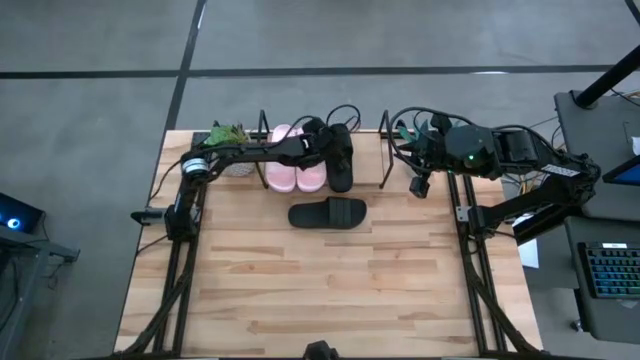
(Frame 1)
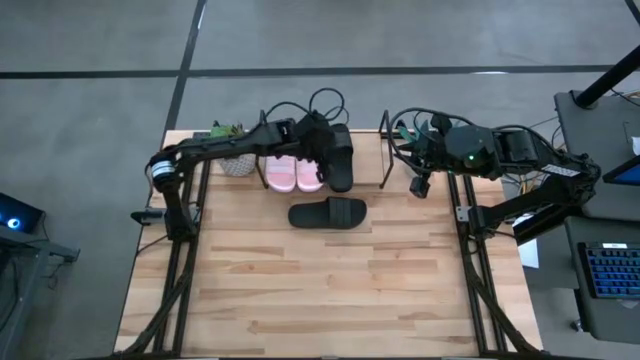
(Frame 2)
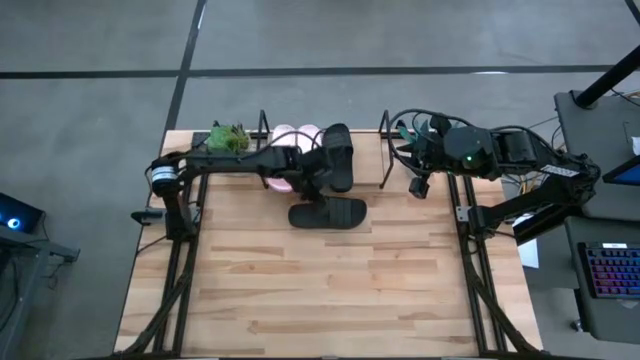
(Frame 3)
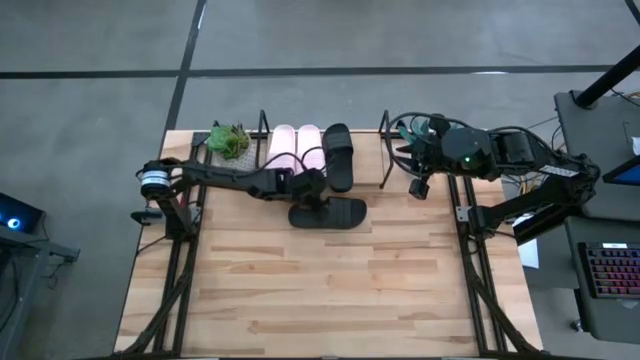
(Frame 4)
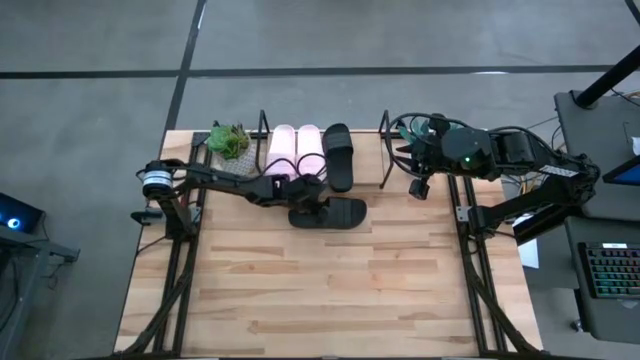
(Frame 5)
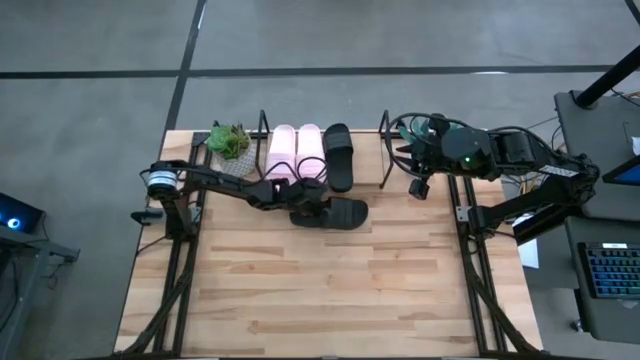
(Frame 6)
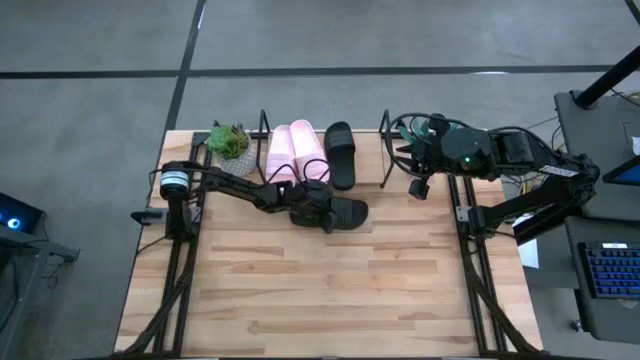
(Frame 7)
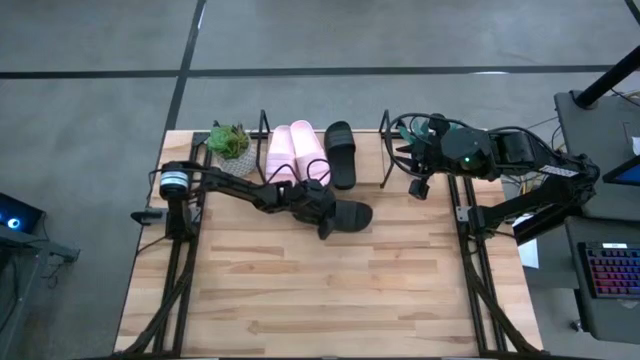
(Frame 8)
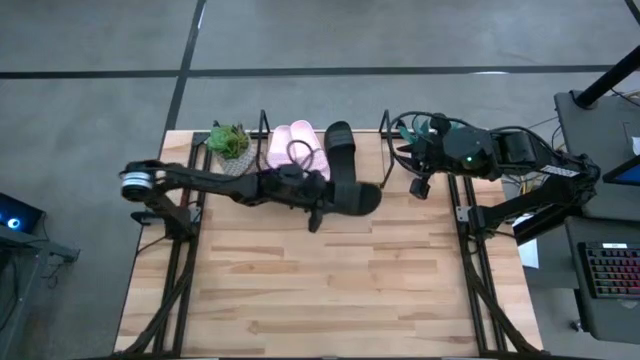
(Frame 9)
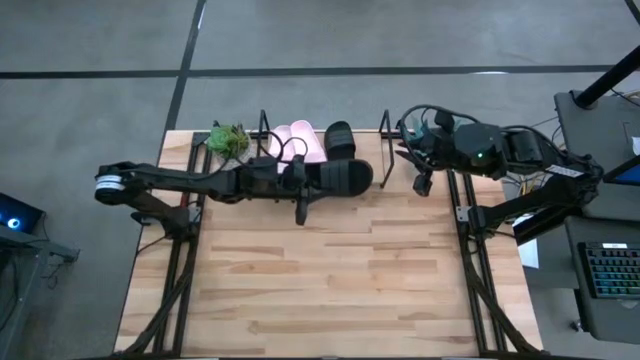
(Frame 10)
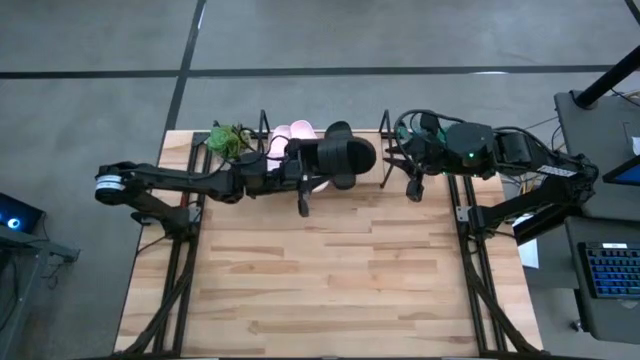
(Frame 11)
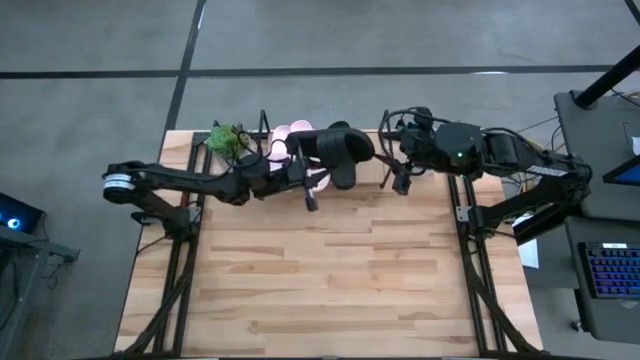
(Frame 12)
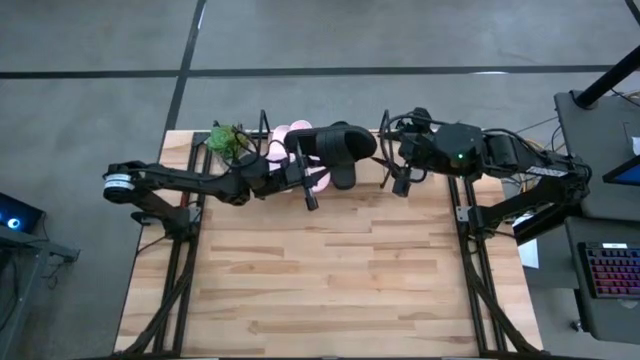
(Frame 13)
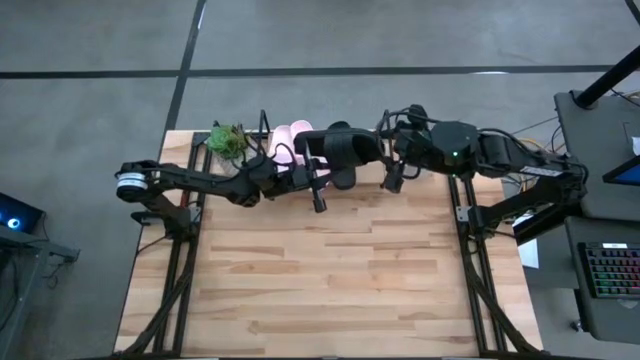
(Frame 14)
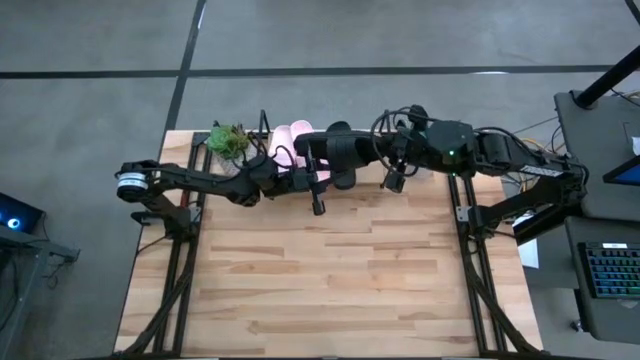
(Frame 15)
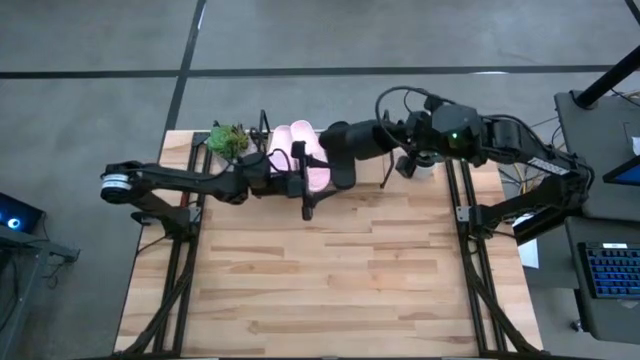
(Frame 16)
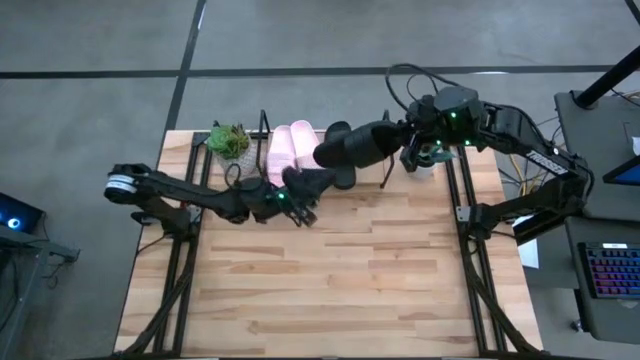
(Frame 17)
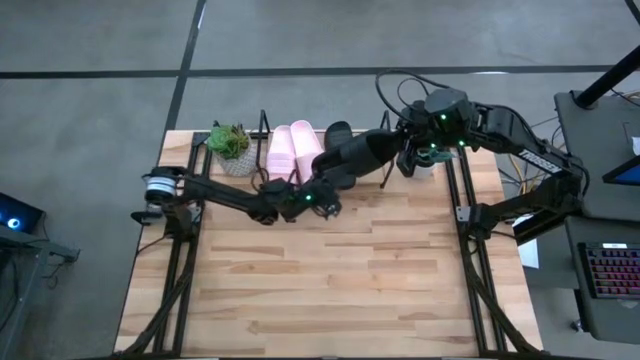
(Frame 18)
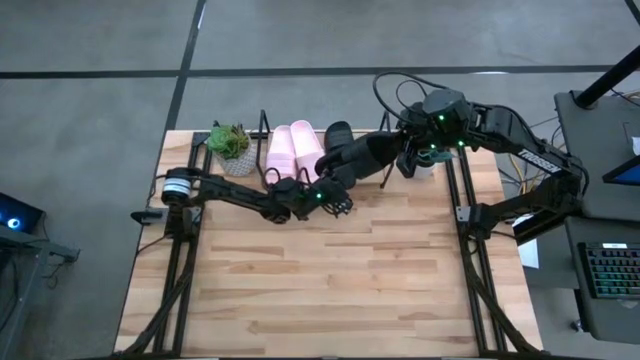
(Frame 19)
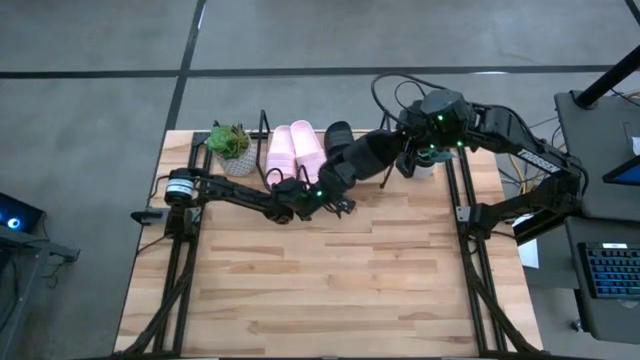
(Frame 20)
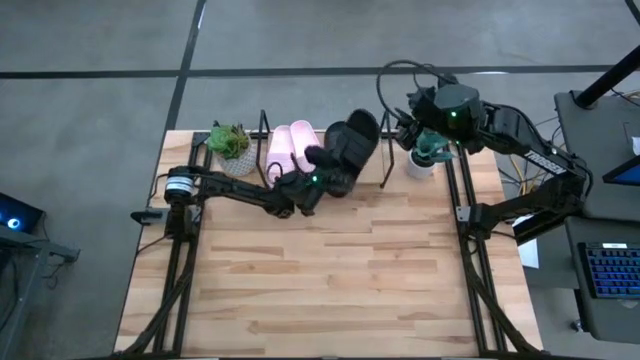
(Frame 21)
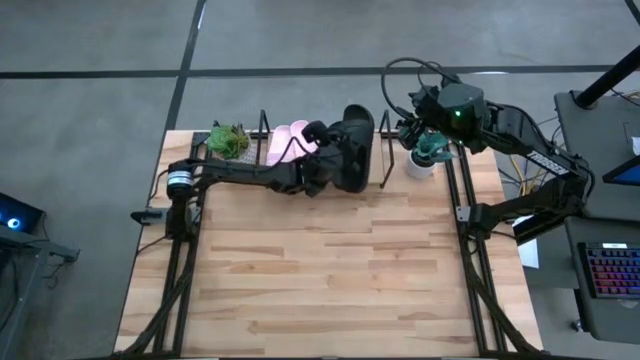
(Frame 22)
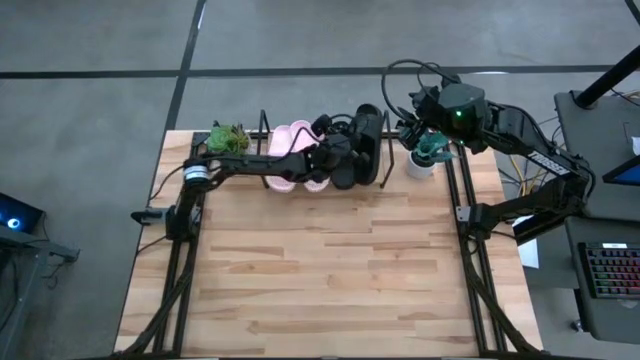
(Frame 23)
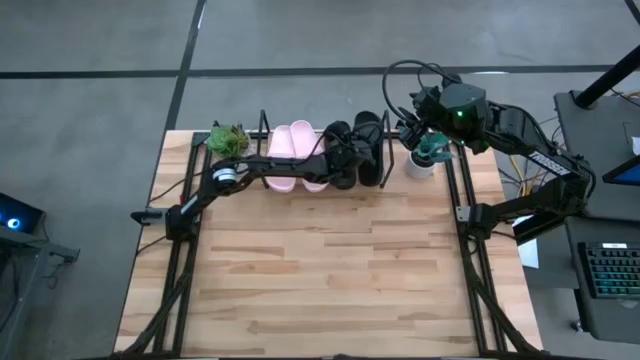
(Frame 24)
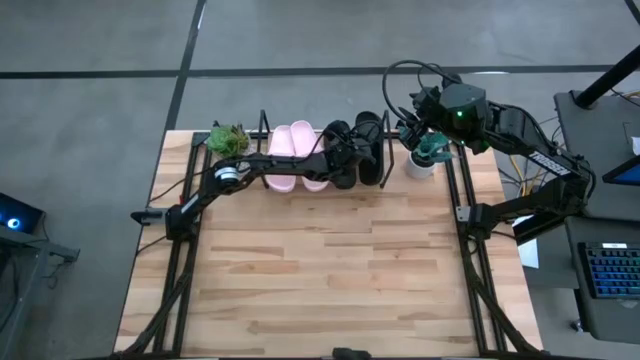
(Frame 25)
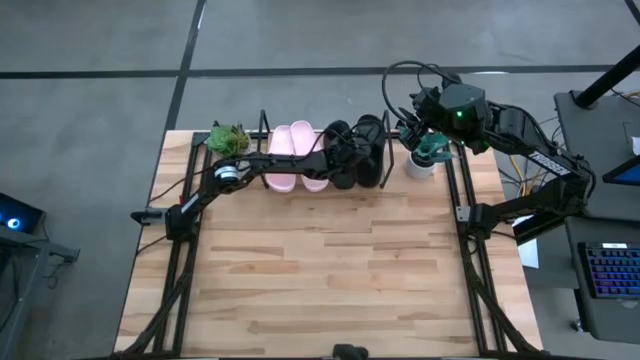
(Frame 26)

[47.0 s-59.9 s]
Task: Pick and place slides into the shelf
Put the black slides on the shelf

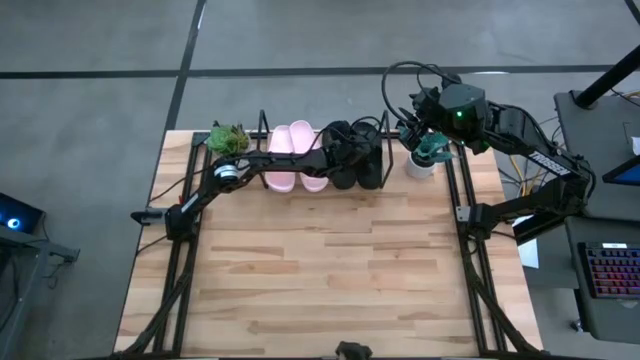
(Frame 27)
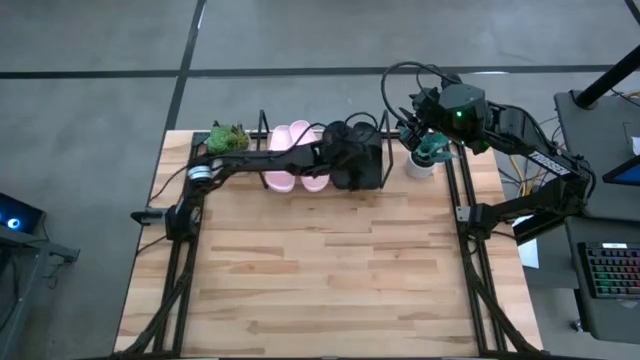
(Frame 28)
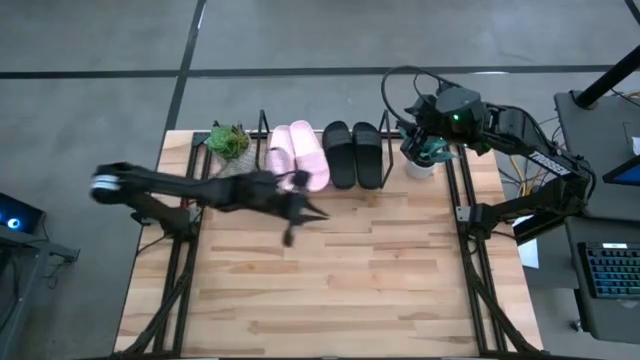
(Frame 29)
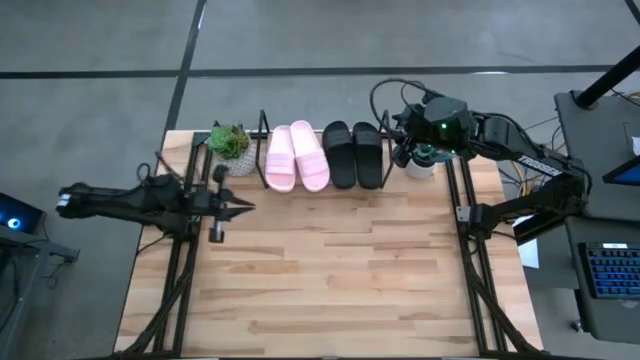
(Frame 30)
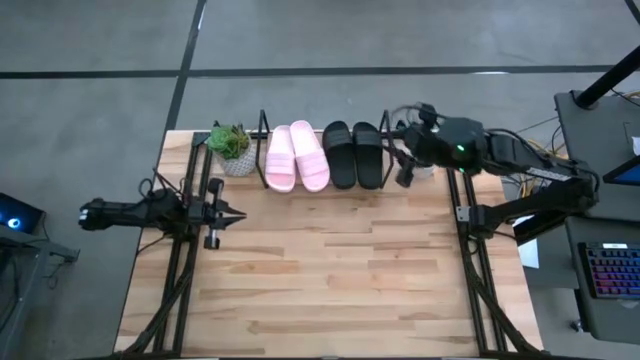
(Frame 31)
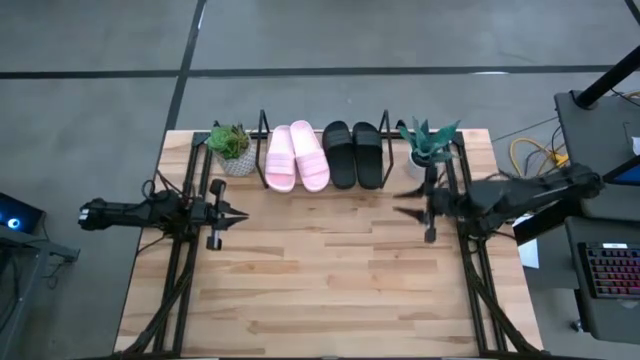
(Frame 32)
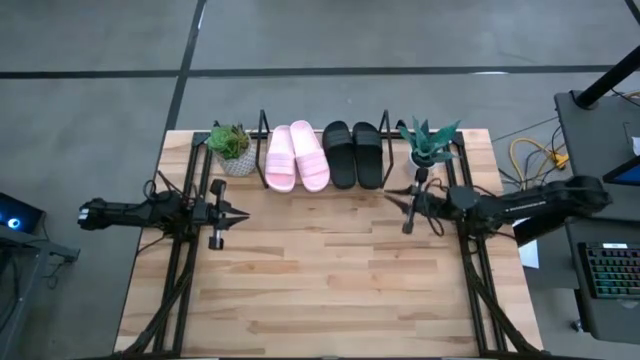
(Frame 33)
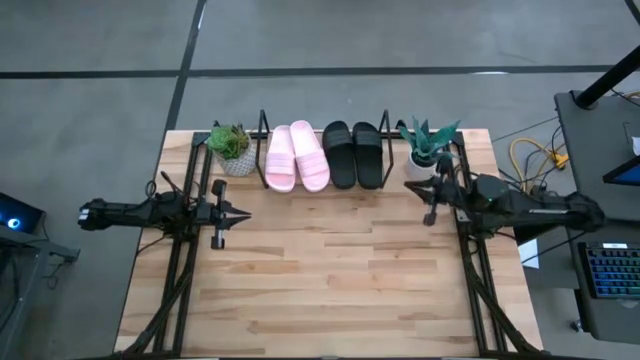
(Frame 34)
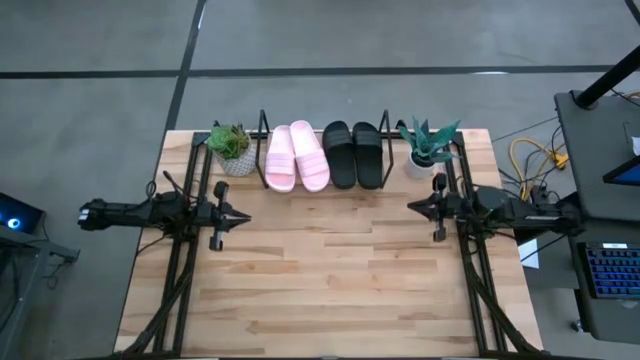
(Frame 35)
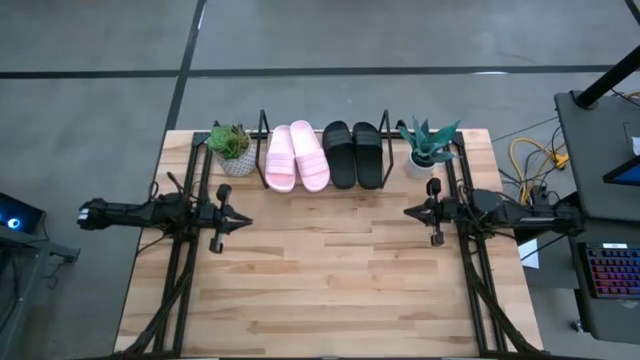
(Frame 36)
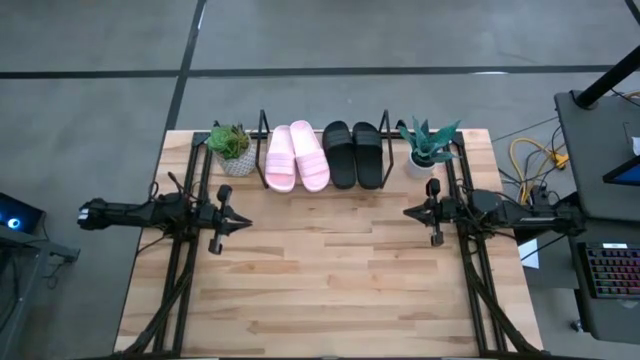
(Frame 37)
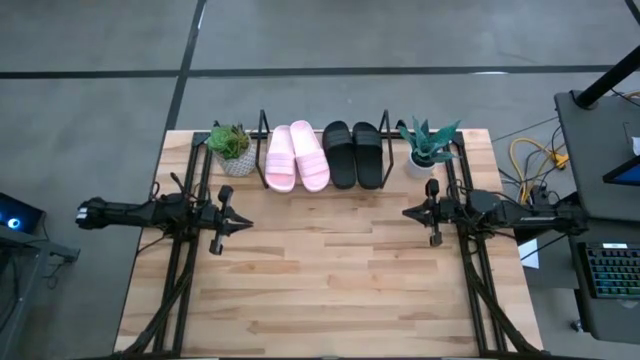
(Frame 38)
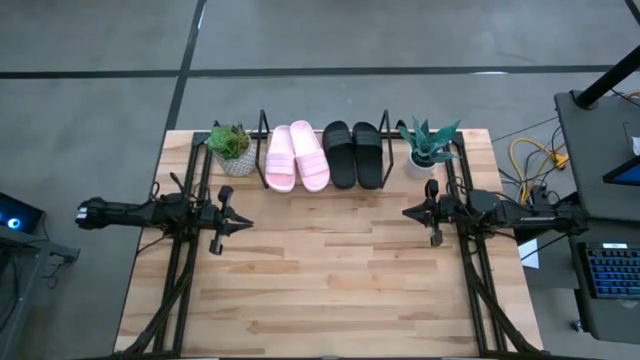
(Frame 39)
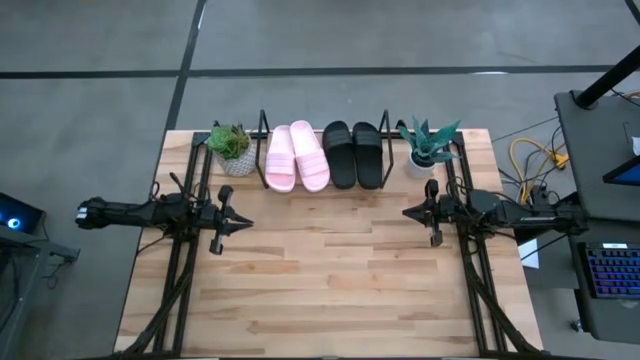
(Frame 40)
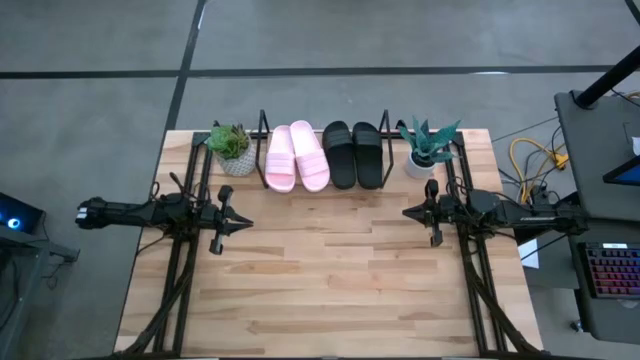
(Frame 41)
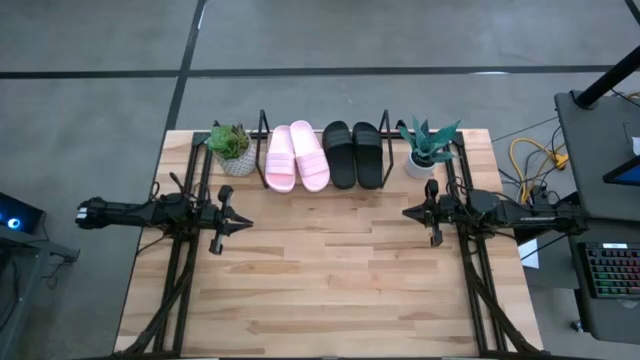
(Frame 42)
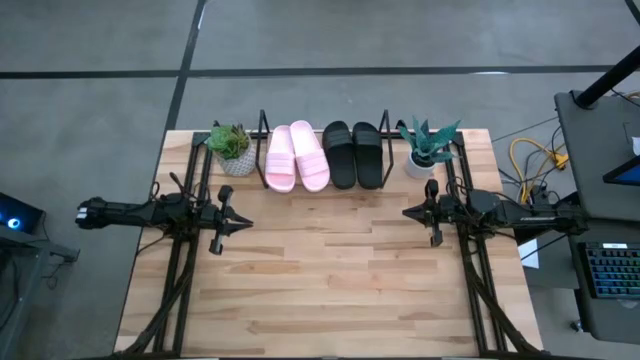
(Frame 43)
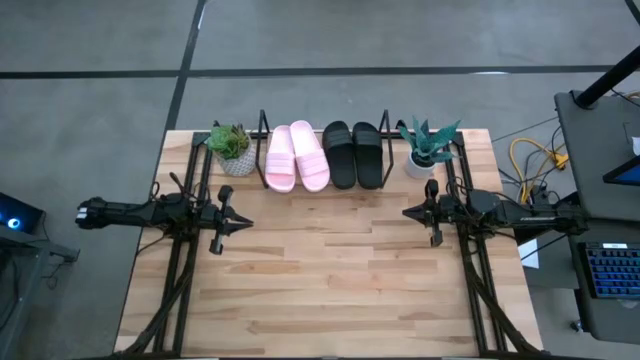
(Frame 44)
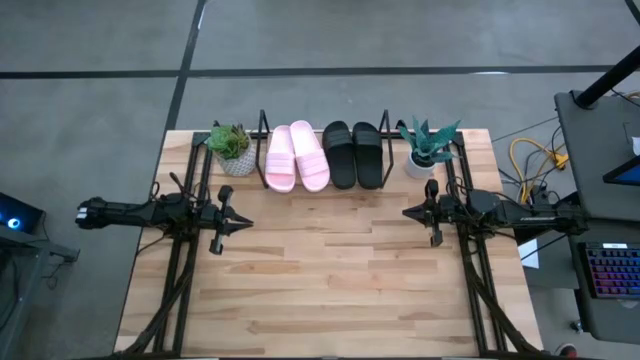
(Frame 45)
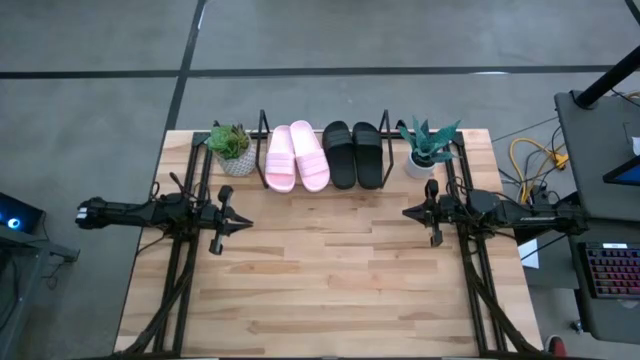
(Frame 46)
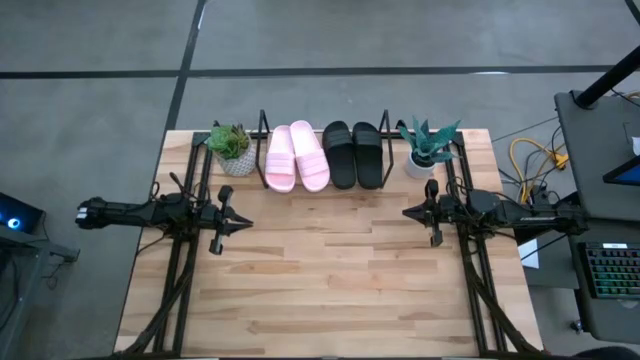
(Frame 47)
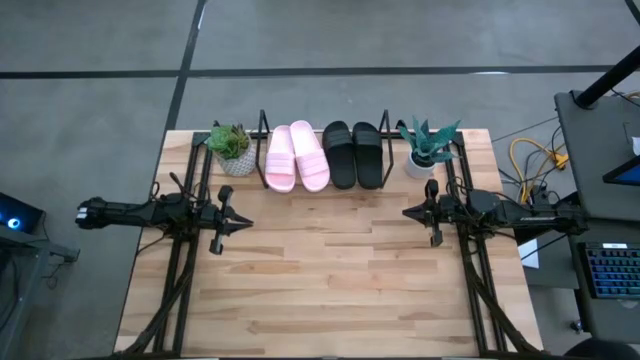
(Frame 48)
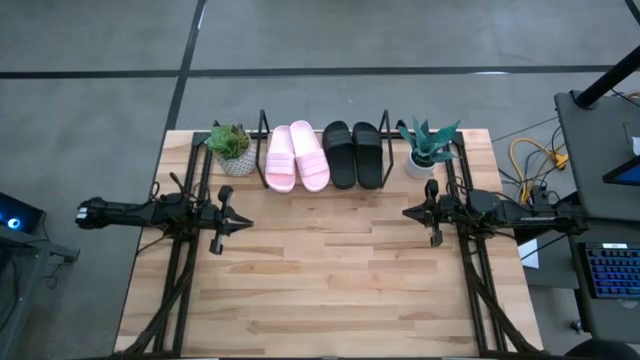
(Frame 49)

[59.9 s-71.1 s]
Return to Home Position
